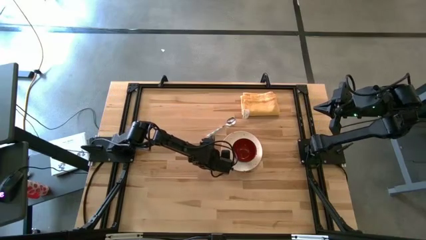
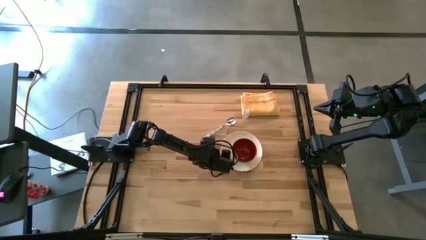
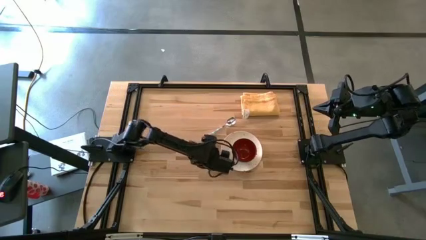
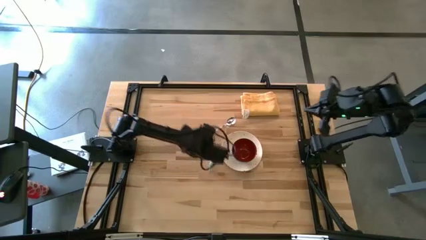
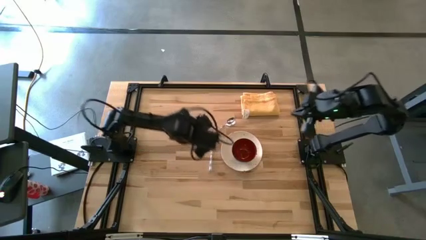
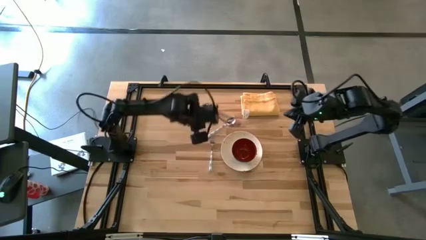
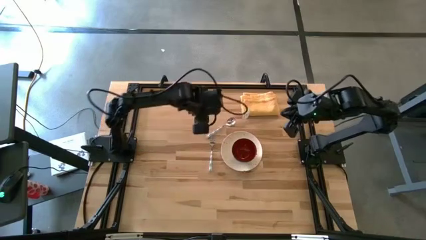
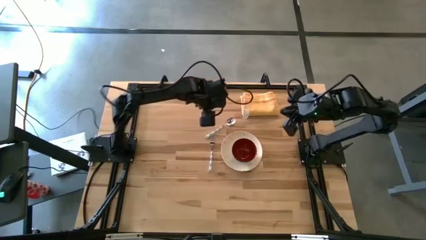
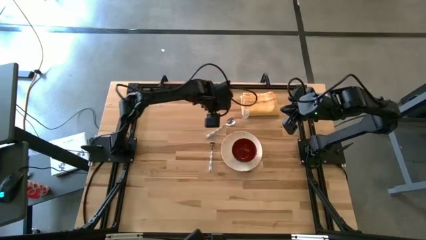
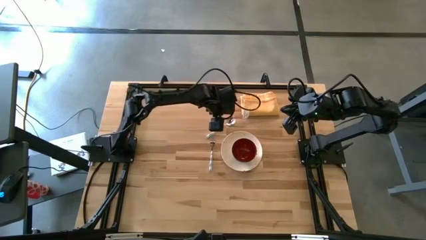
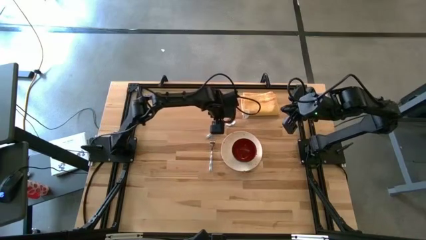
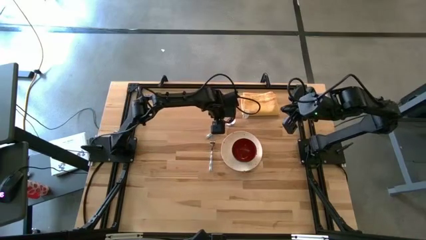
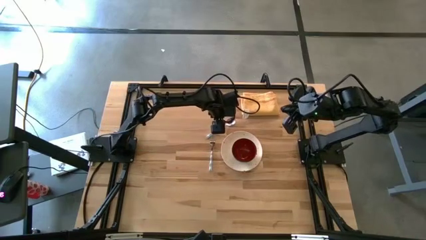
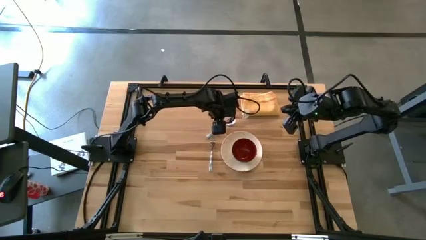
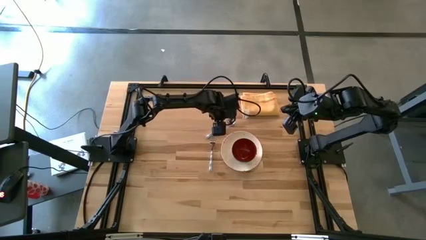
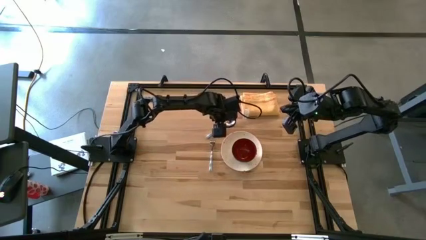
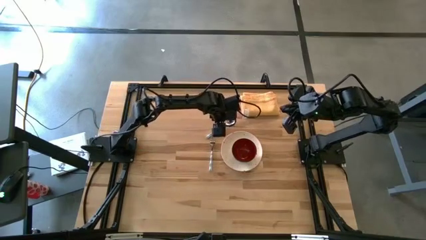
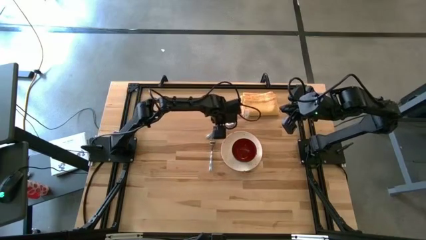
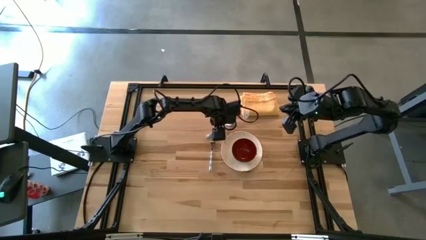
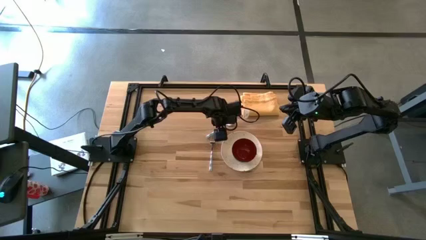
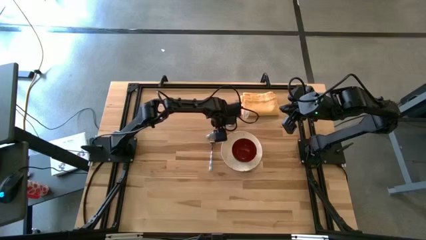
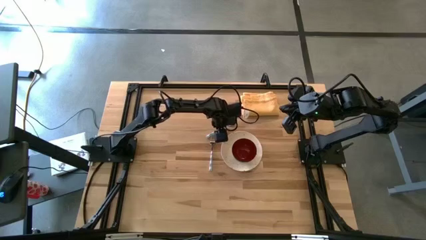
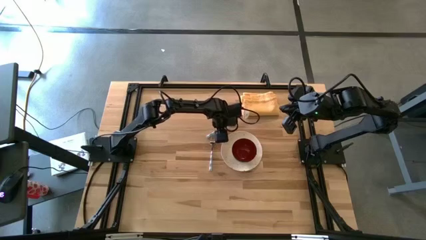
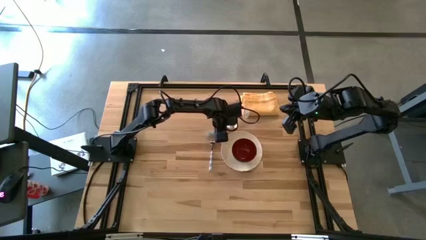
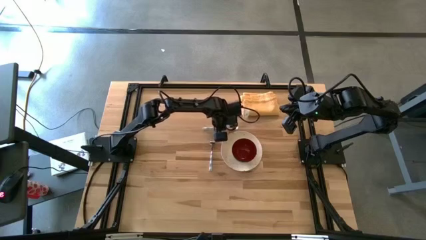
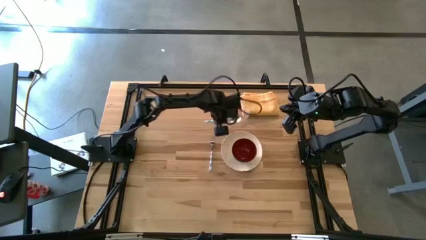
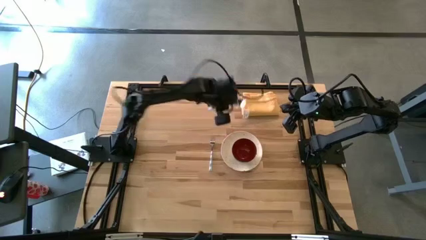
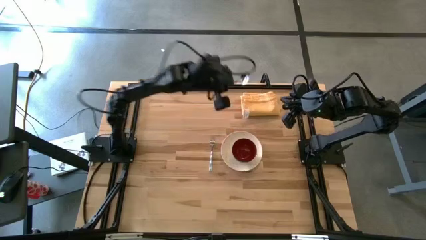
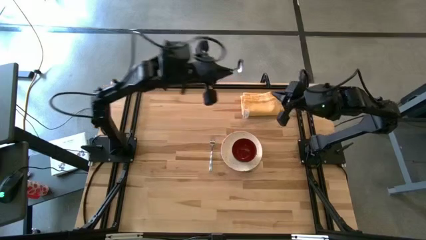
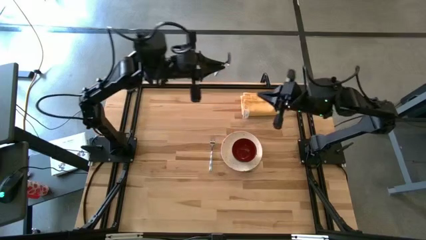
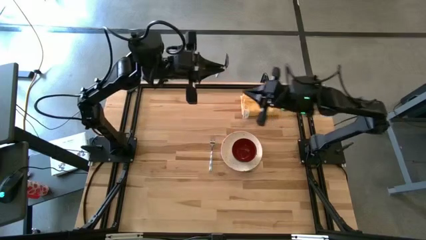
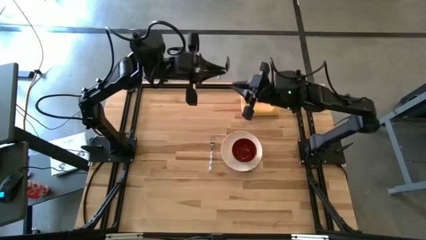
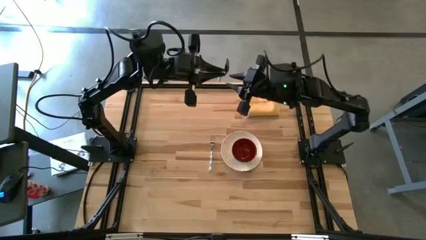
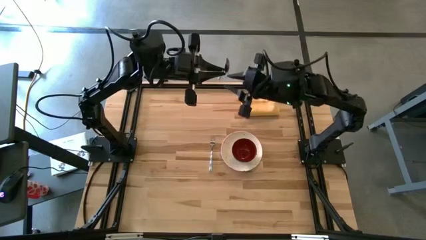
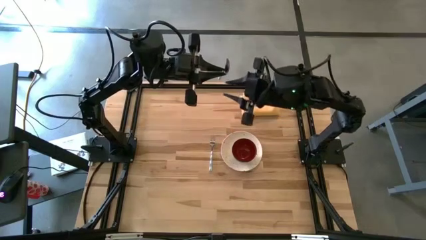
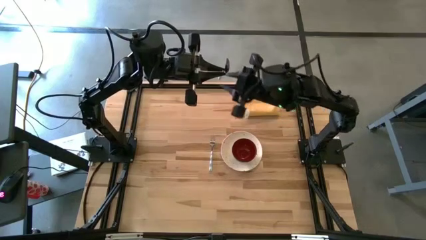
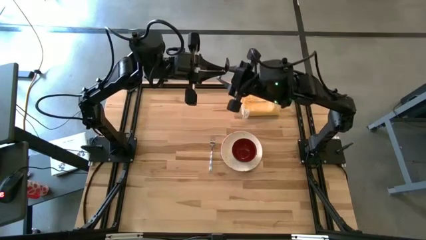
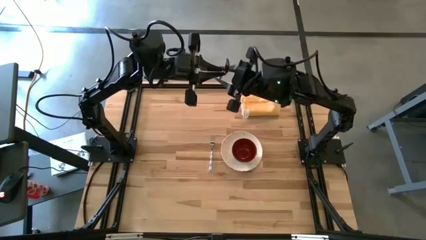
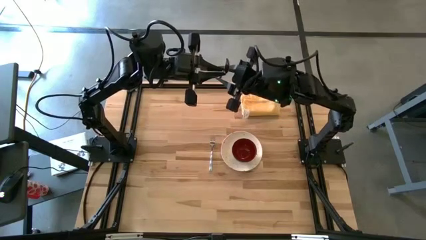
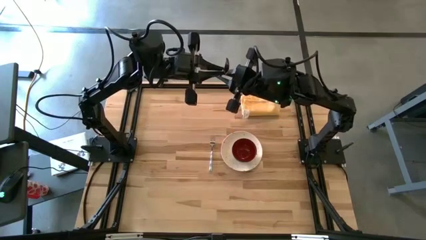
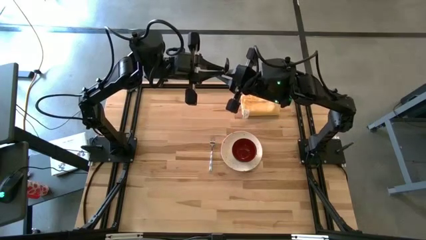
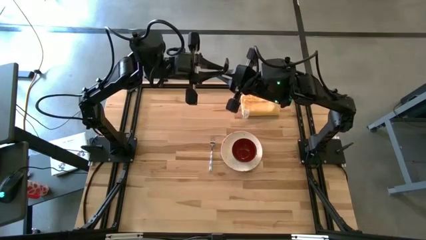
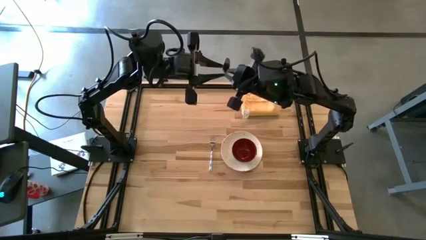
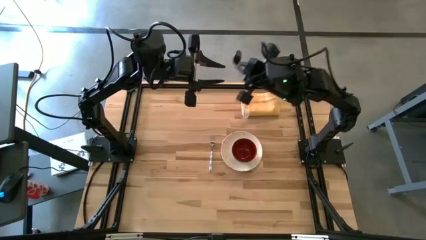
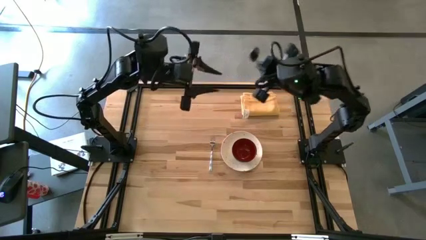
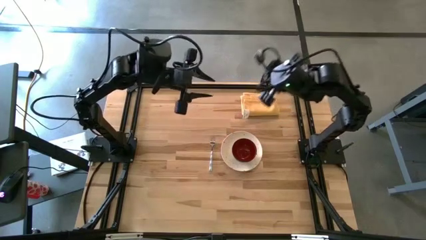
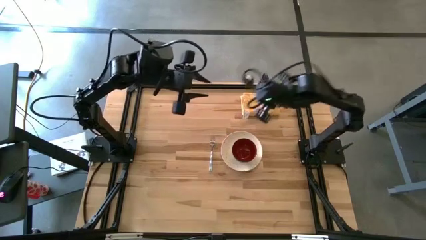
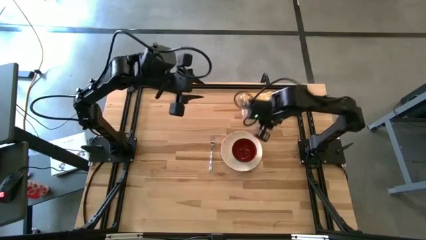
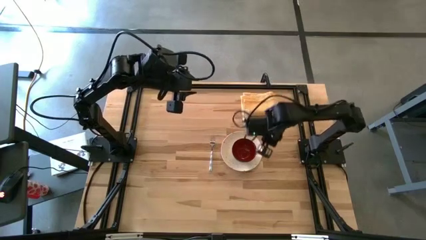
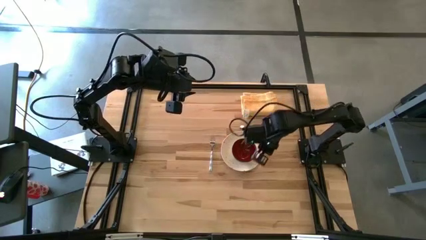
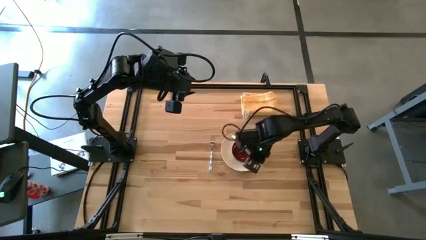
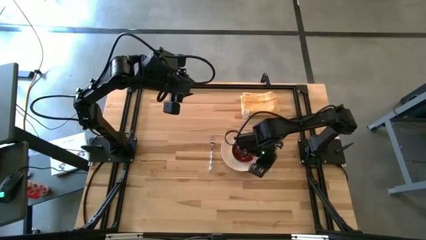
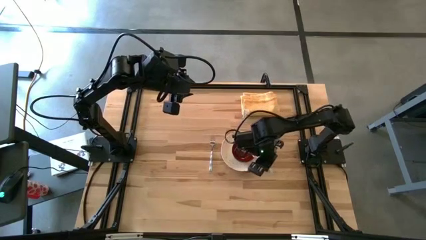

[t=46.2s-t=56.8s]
Task: Set table place
Put the spoon into the black bowl
